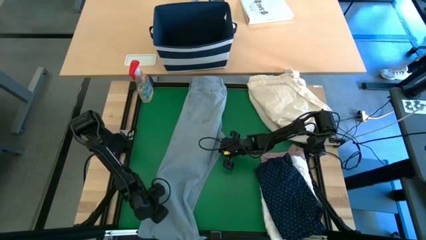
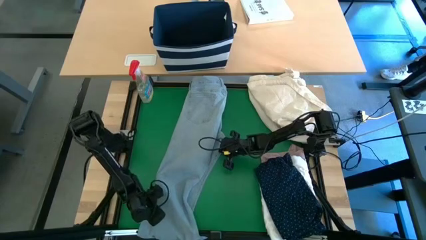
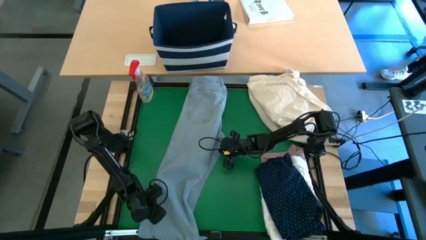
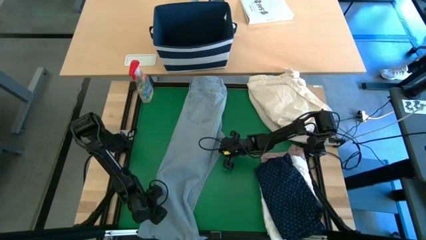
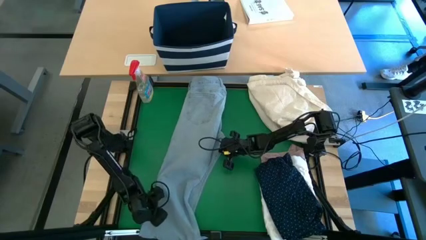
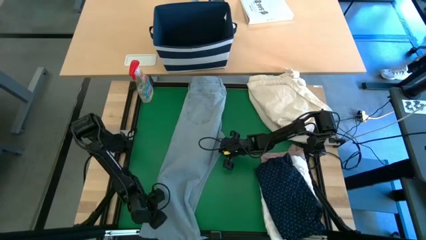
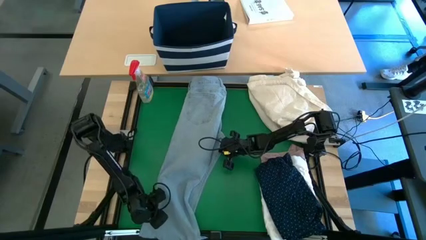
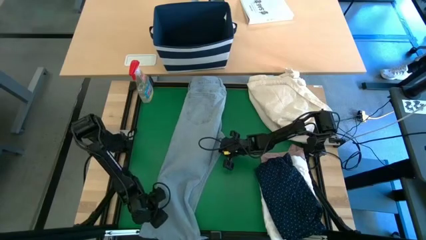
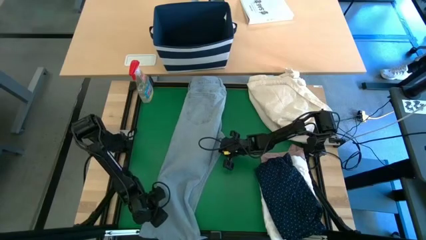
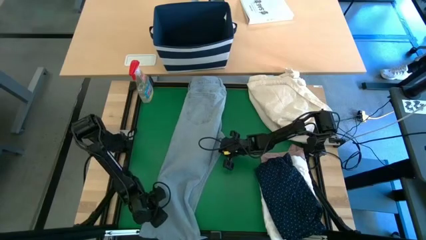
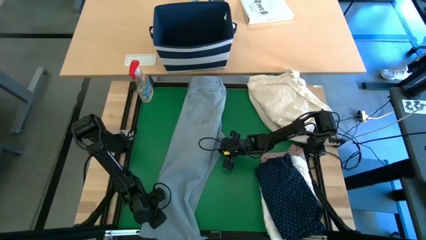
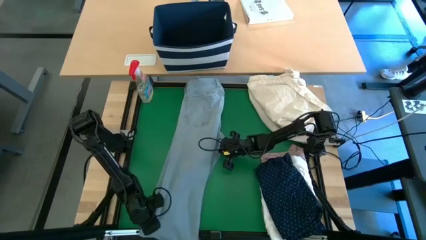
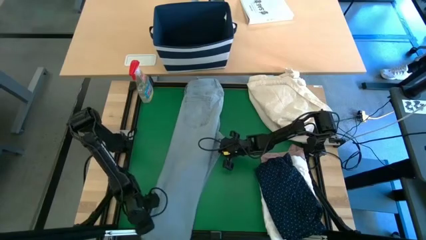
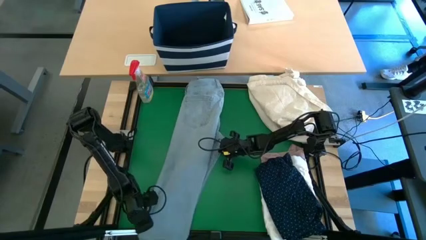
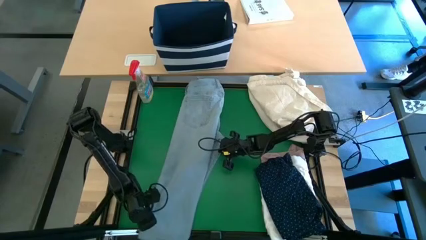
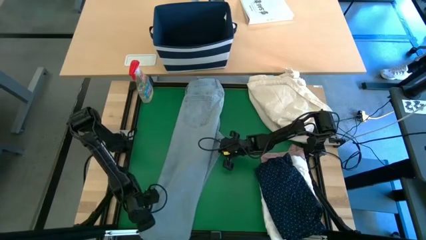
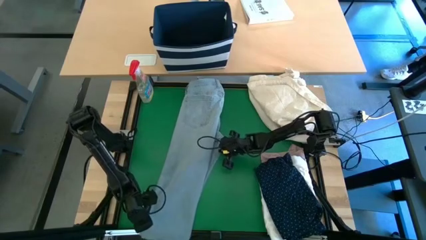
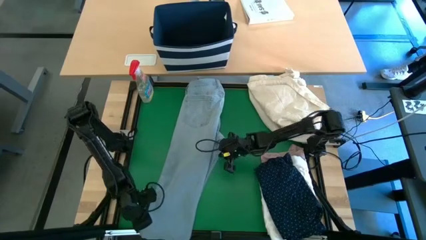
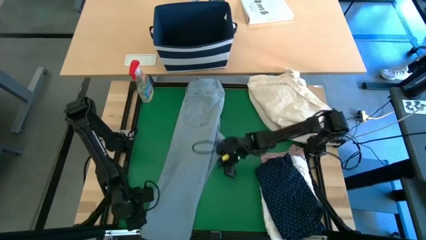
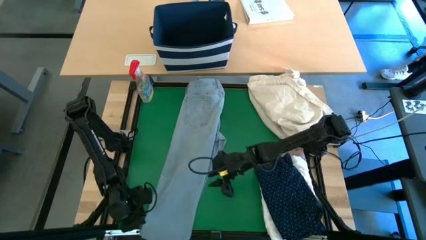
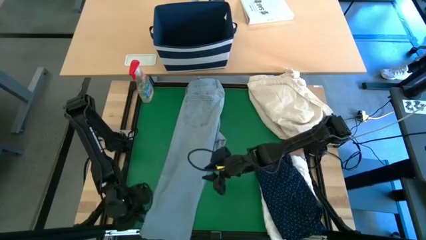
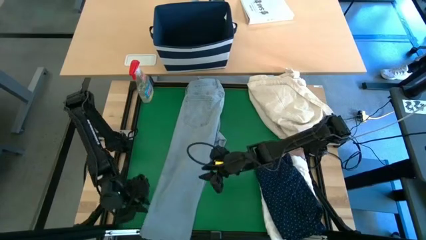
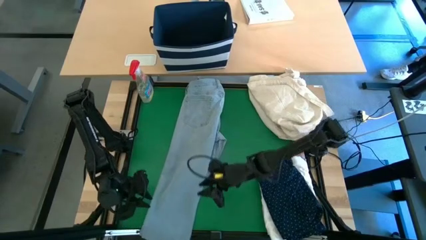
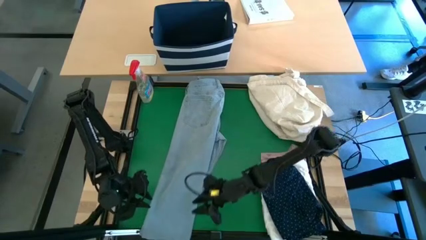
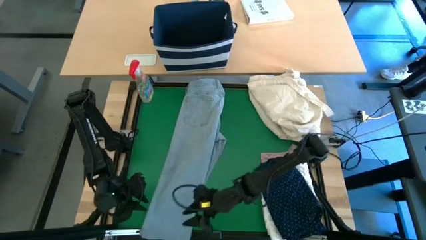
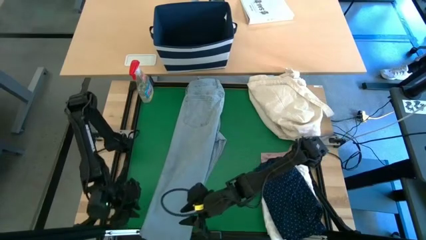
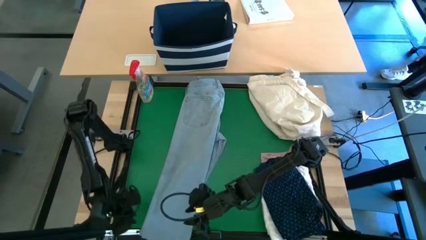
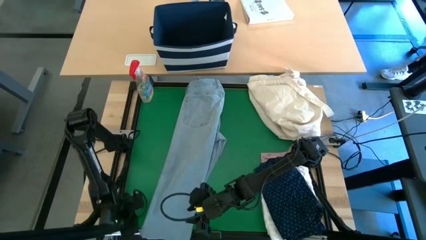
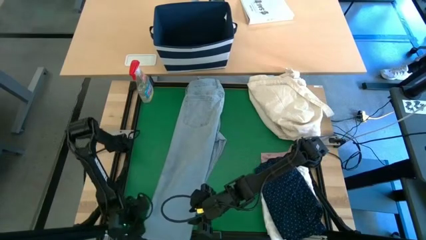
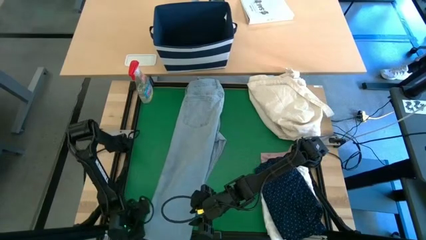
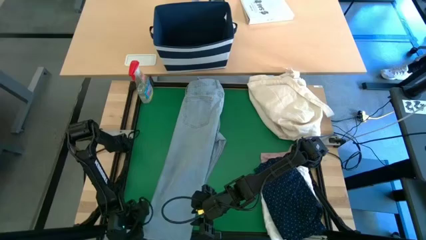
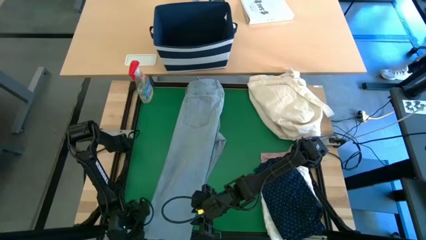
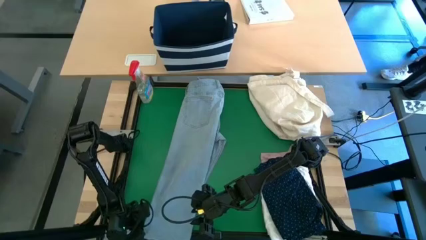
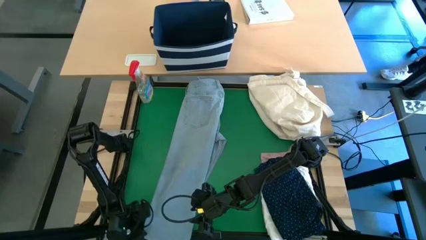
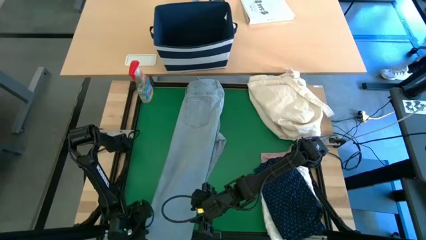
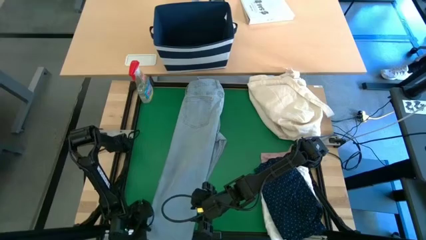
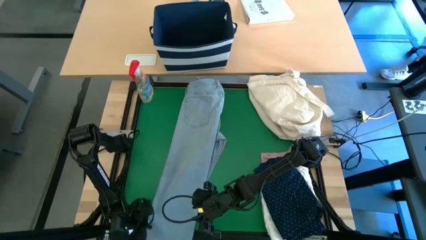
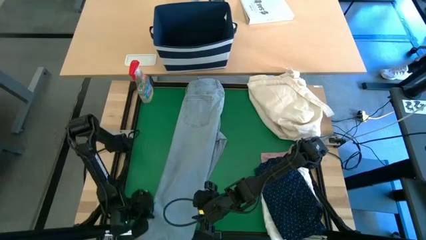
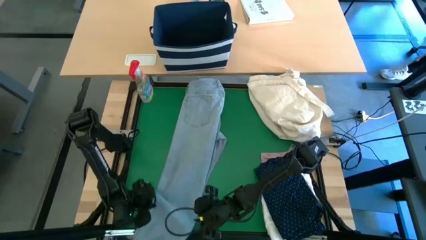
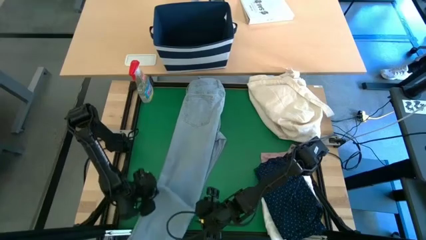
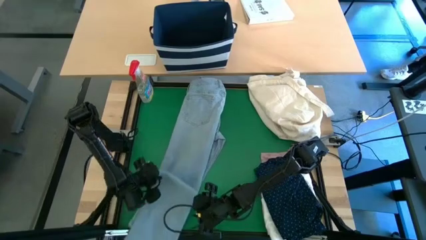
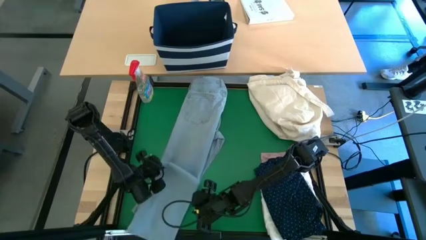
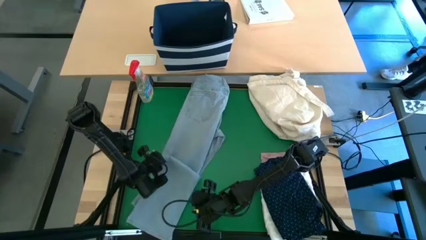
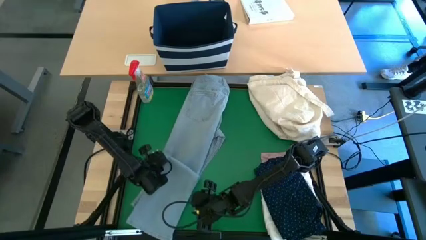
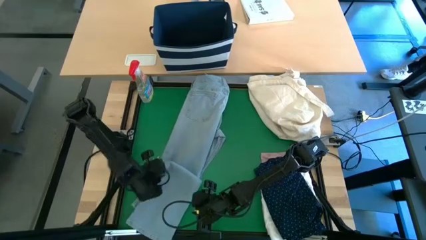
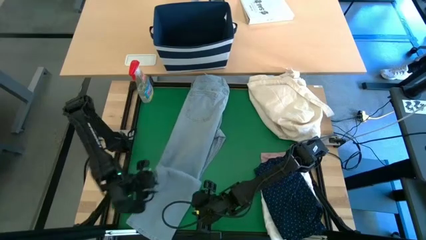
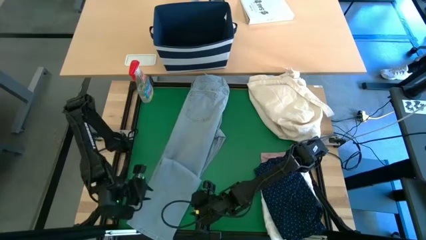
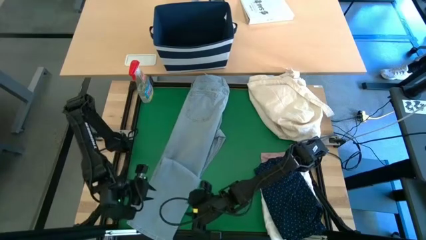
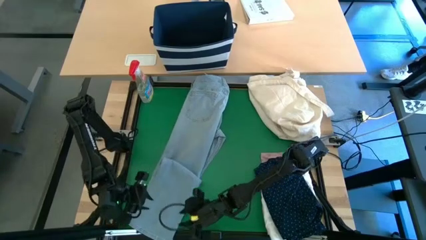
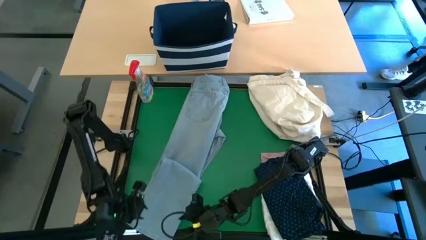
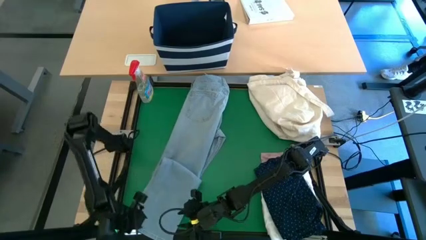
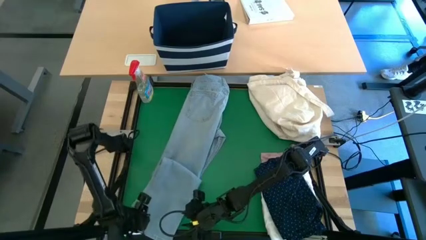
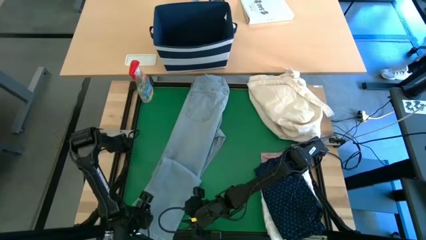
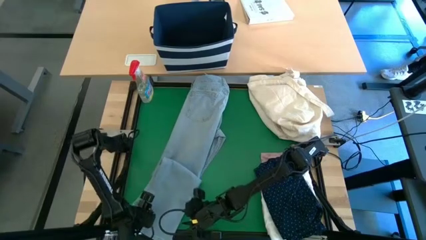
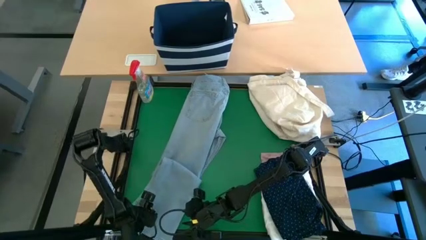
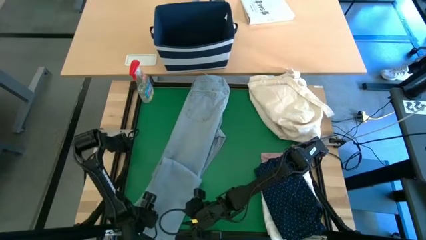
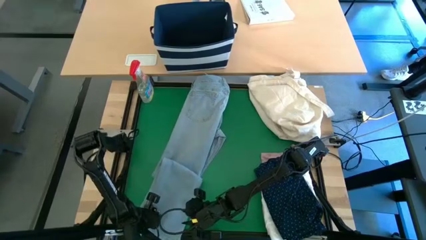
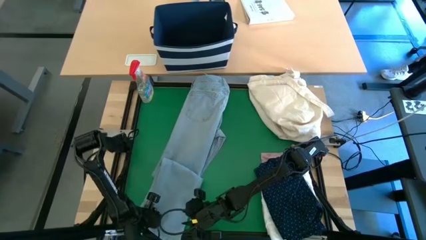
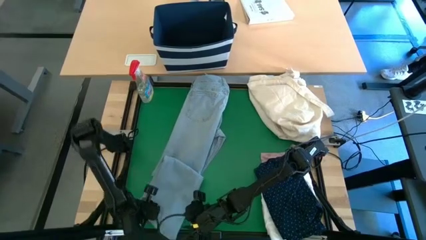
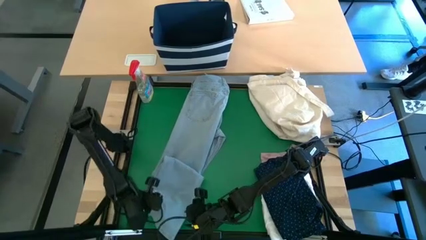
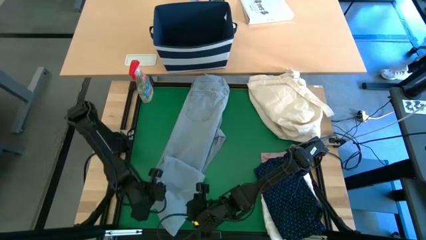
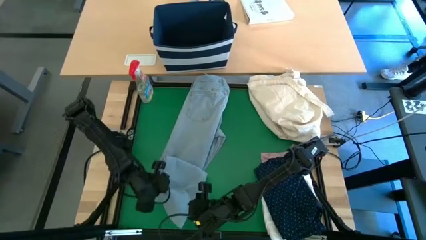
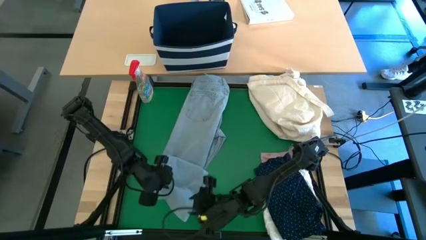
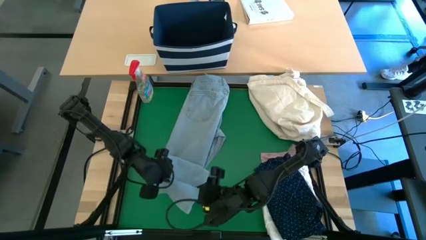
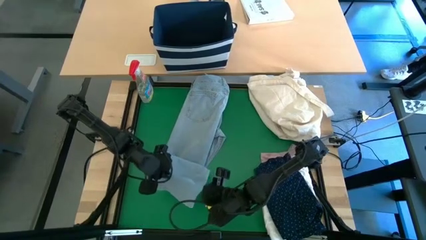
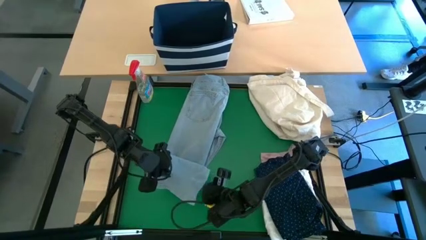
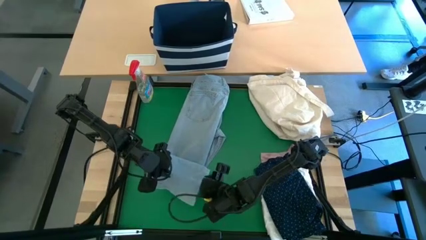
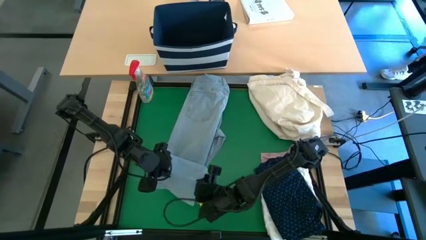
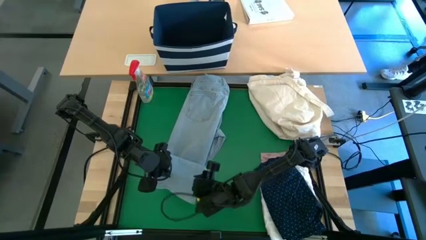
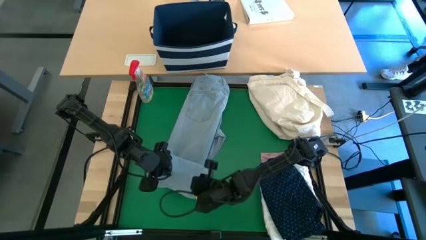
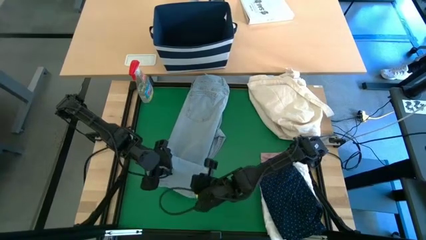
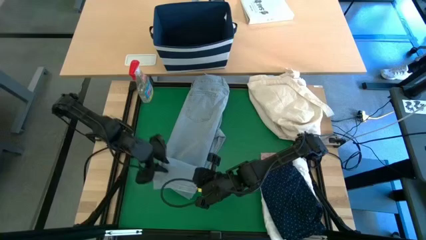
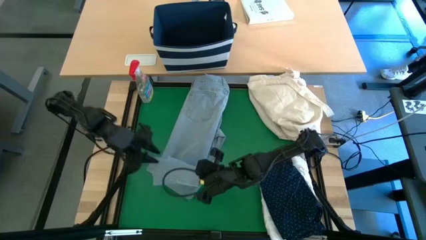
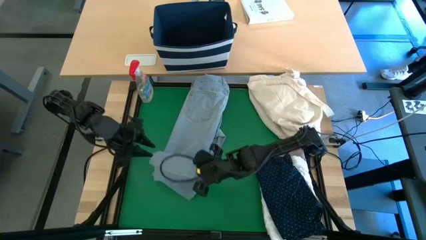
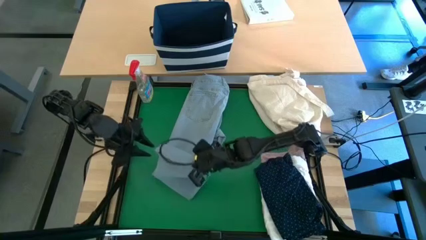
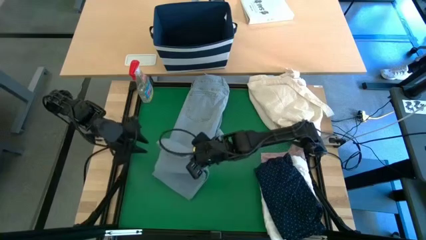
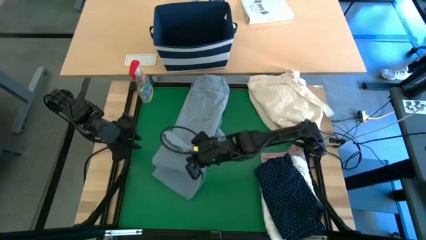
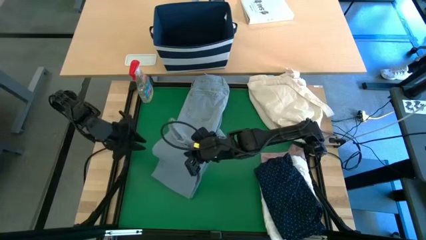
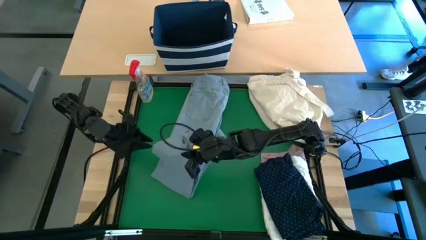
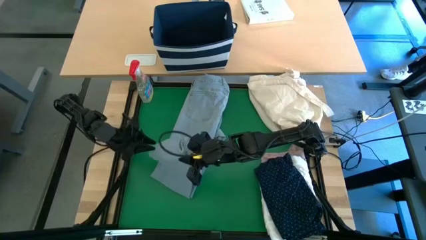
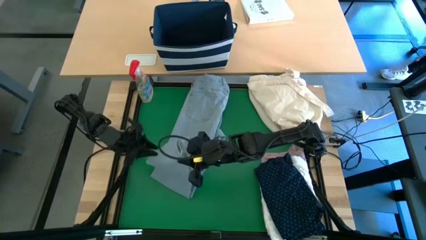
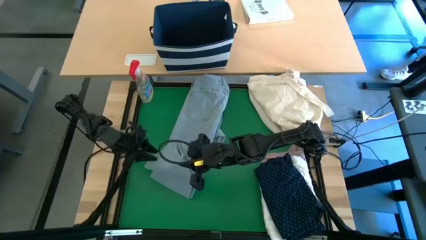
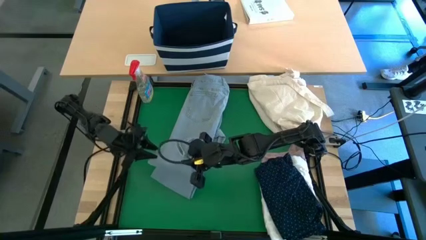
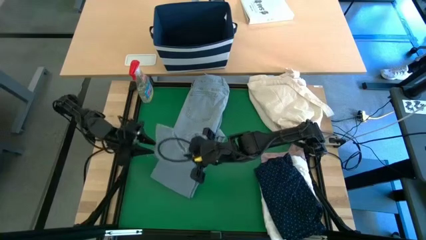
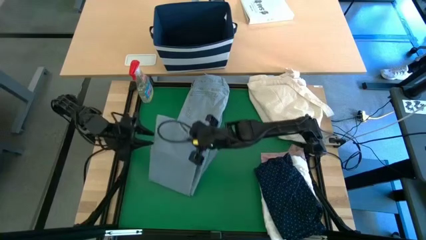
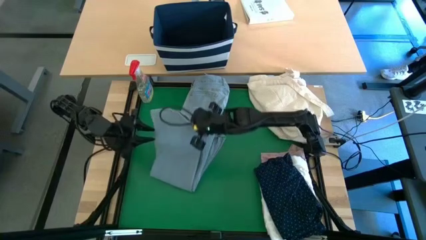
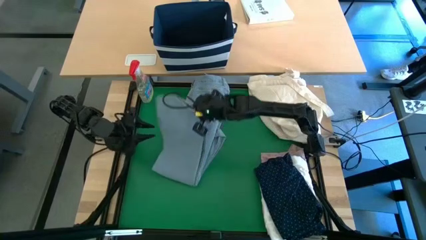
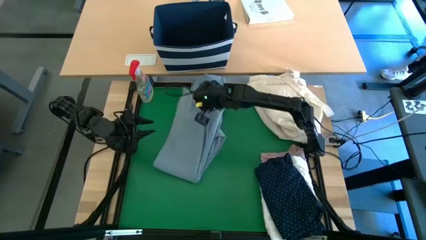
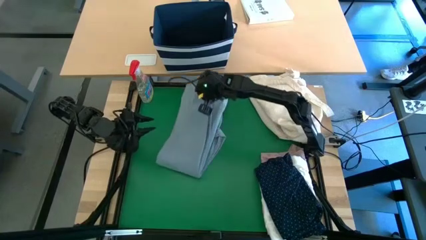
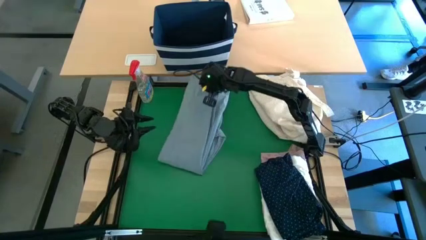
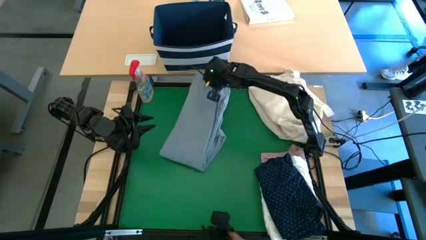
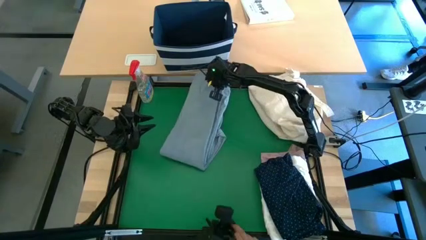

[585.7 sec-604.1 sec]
Task: Fold laundry
Fold the blue jeans
